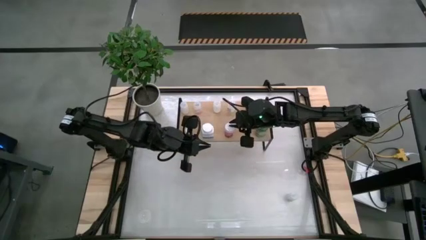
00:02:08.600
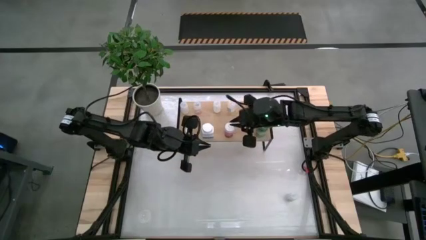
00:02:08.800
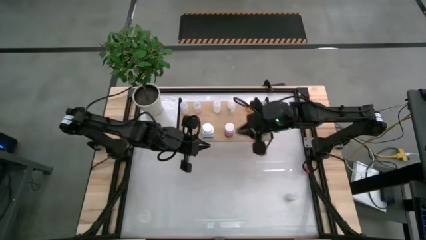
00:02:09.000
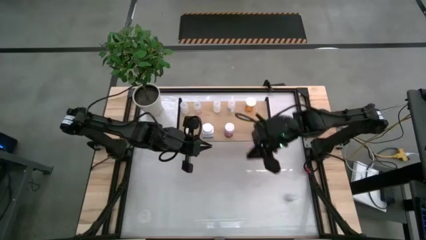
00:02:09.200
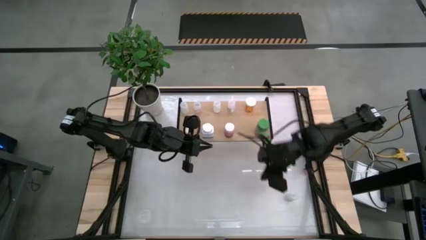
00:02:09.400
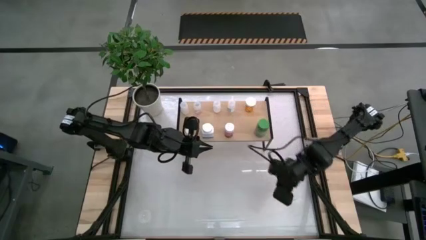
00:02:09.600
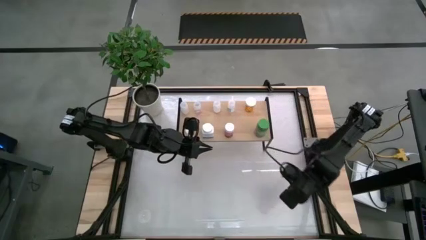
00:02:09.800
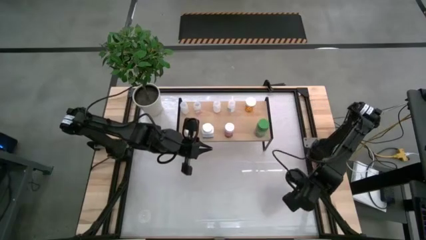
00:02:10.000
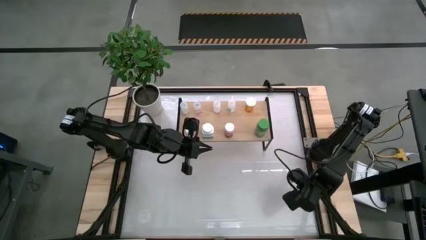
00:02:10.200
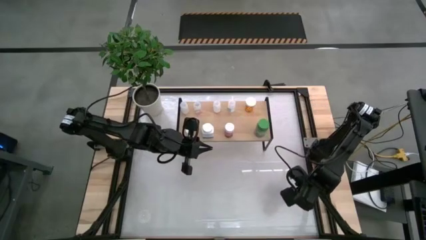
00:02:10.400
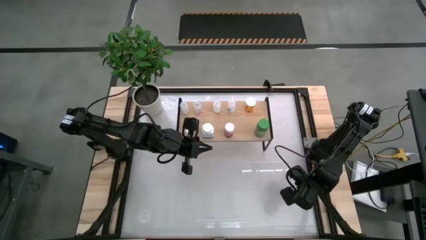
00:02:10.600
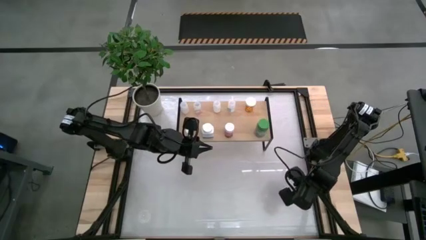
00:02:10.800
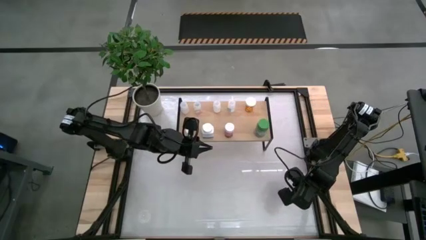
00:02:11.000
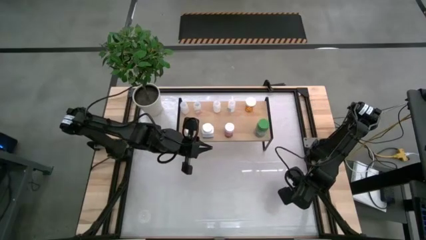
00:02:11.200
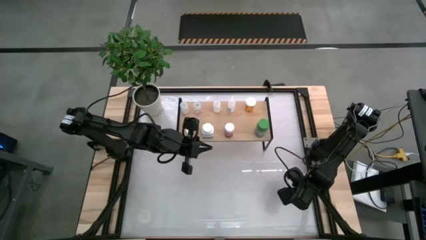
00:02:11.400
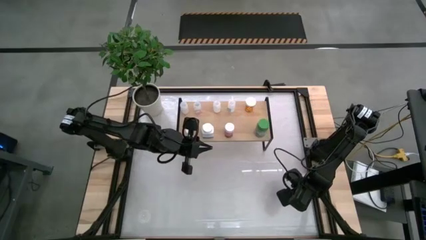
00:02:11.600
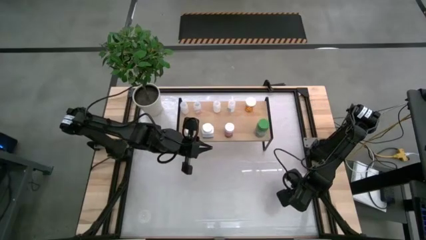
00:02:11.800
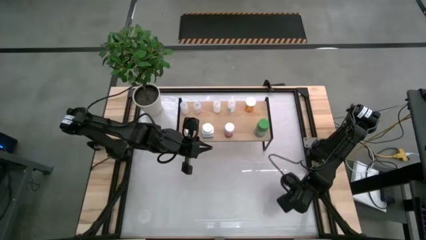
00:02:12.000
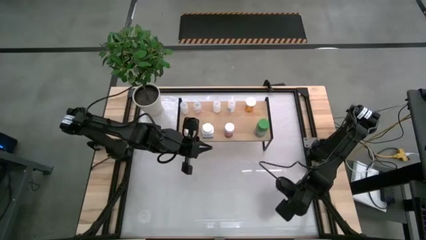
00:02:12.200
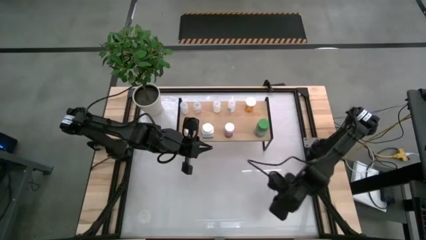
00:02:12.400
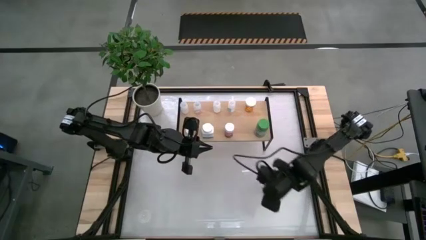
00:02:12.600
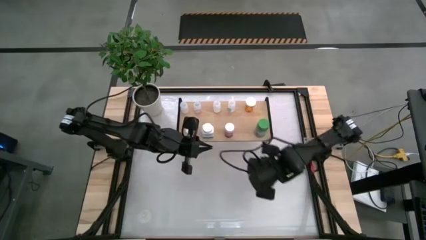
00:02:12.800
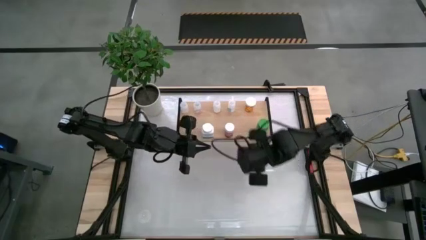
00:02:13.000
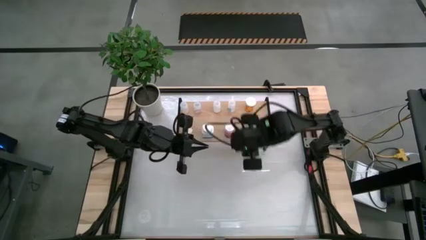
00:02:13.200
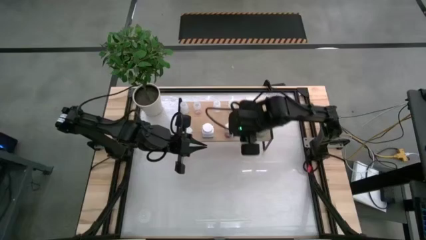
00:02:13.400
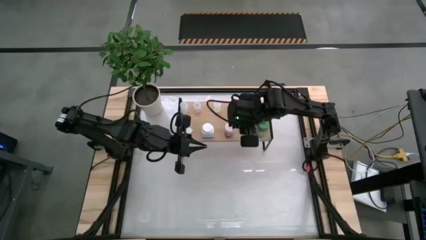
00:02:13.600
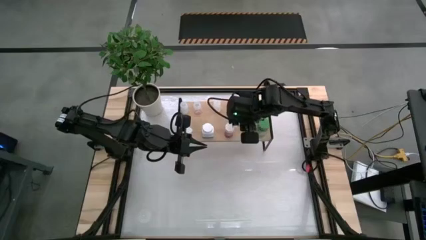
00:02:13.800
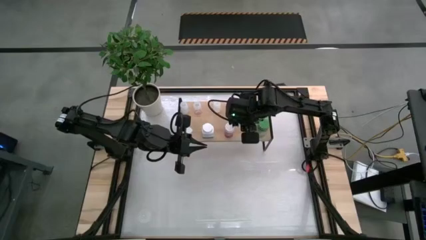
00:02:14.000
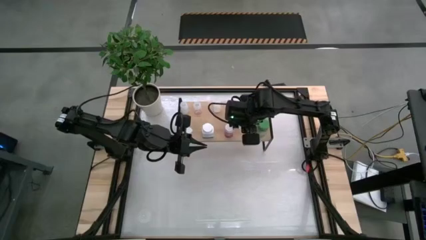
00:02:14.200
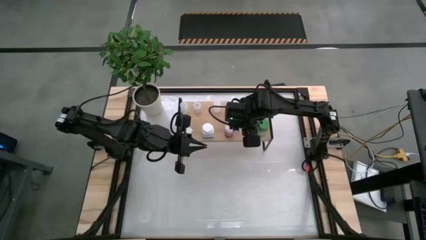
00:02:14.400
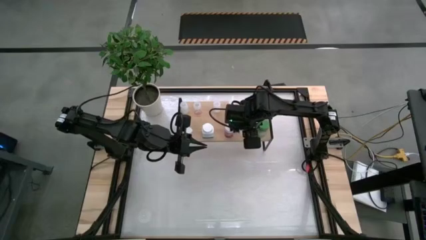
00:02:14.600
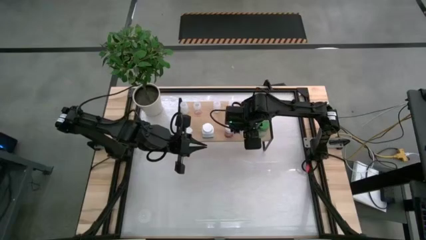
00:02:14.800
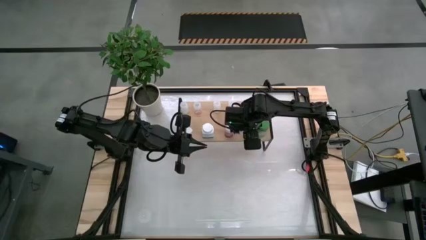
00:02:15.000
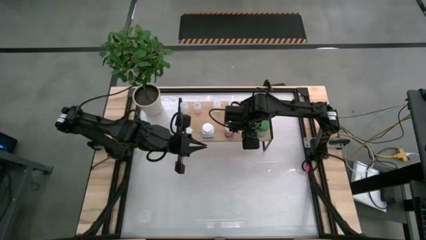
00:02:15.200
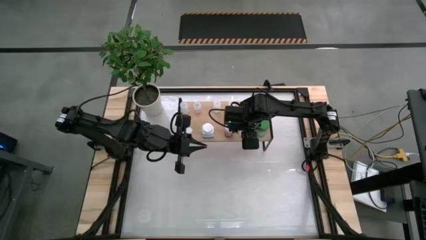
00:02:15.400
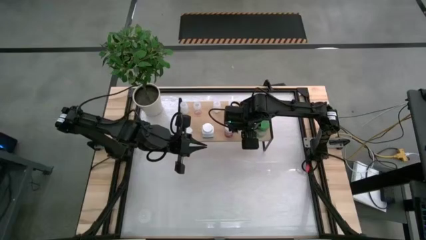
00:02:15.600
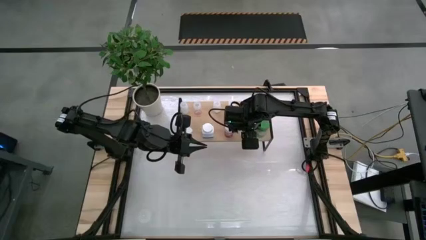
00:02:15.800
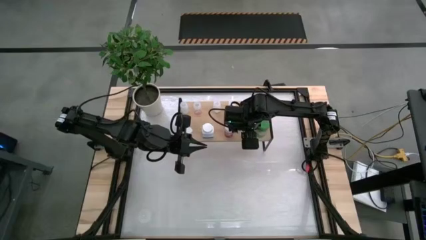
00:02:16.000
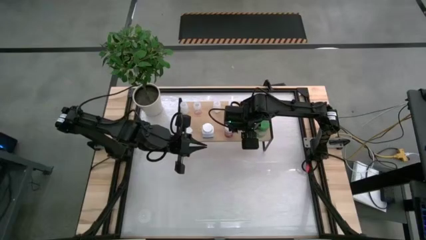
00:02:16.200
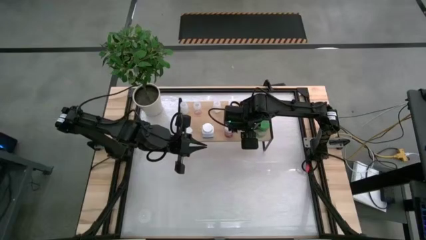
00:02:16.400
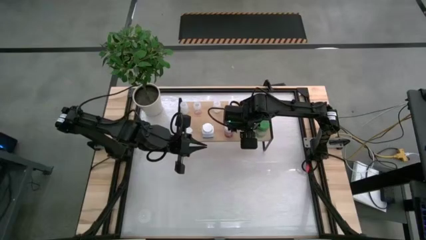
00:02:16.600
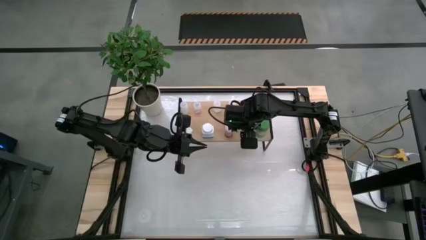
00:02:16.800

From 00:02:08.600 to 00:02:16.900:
Task: Pick and place medicine bottles onto shelf by color
Put the transparent pill bottle on the shelf

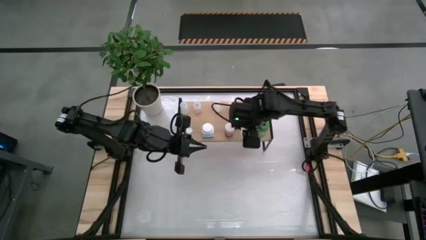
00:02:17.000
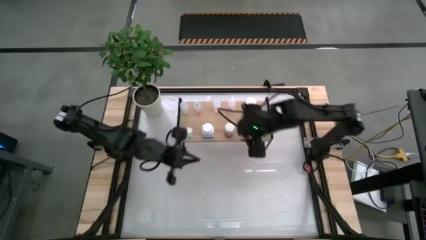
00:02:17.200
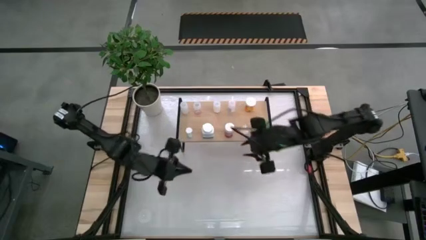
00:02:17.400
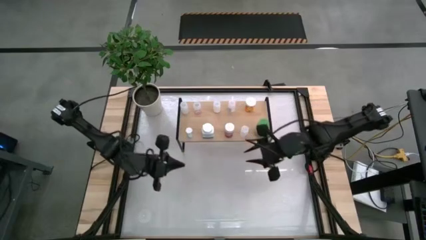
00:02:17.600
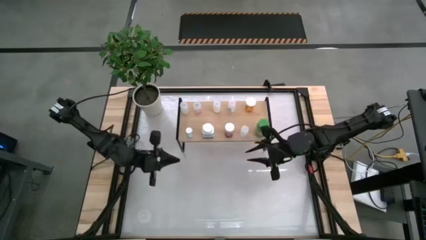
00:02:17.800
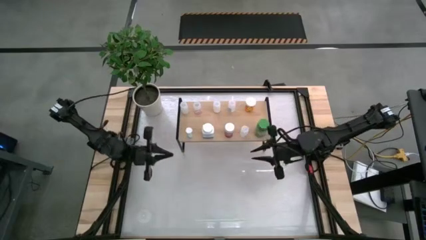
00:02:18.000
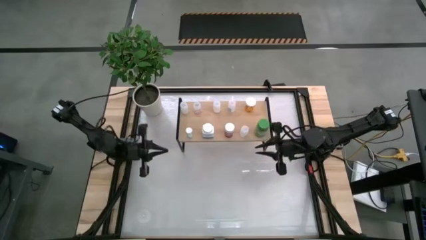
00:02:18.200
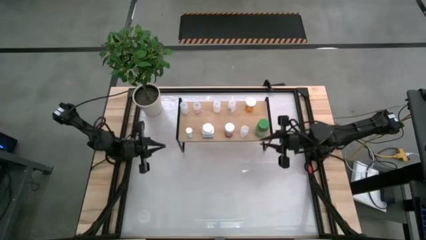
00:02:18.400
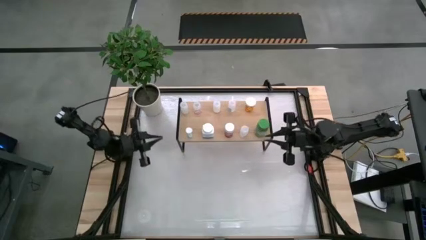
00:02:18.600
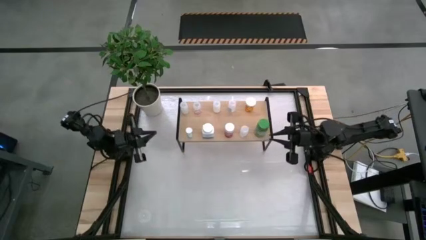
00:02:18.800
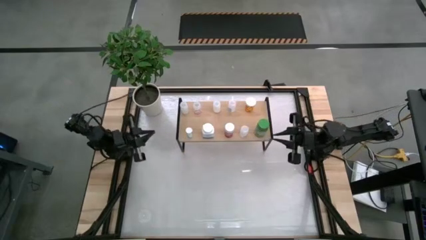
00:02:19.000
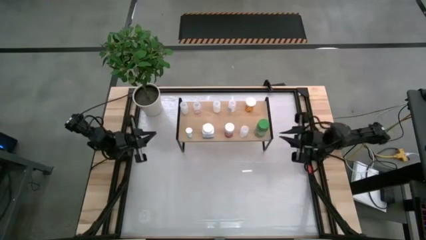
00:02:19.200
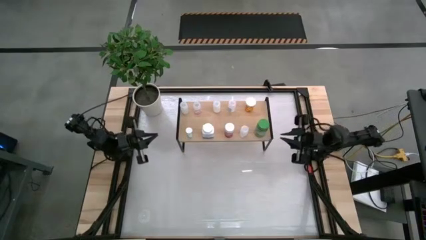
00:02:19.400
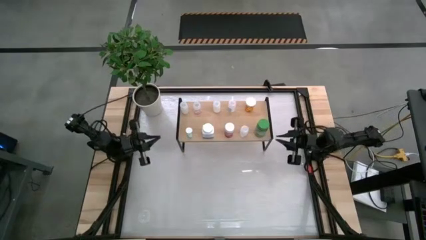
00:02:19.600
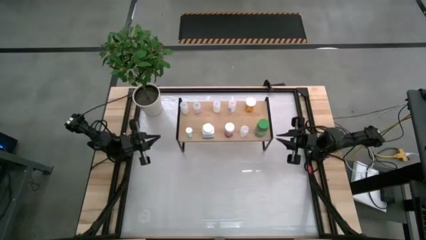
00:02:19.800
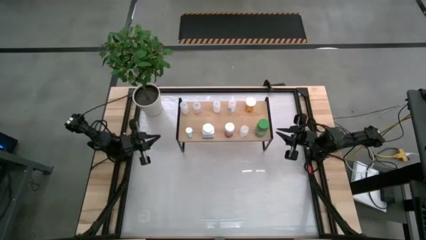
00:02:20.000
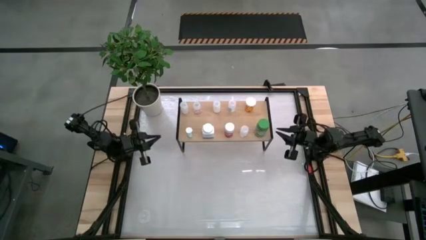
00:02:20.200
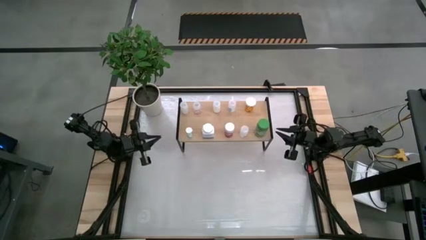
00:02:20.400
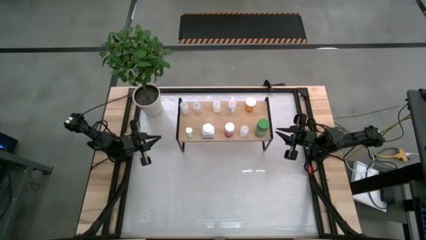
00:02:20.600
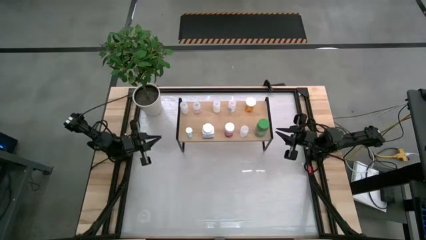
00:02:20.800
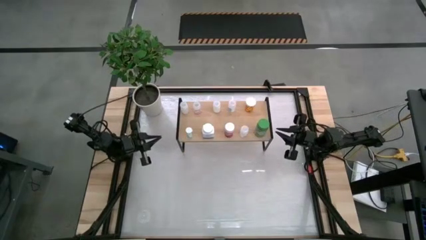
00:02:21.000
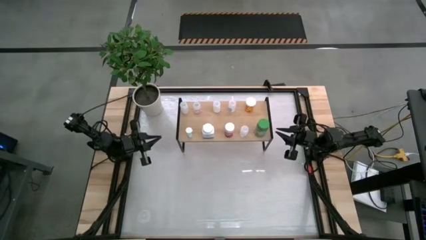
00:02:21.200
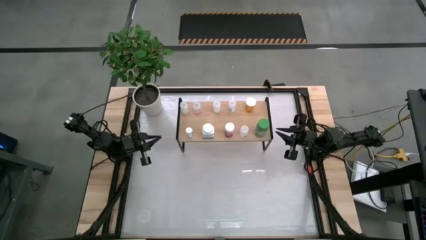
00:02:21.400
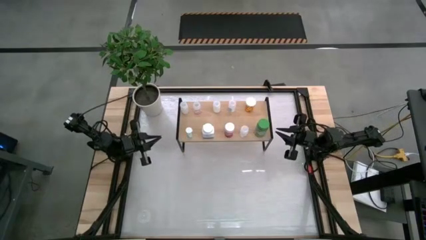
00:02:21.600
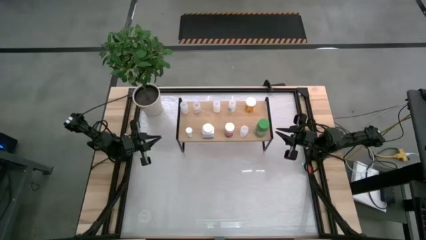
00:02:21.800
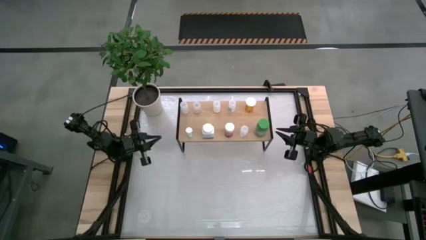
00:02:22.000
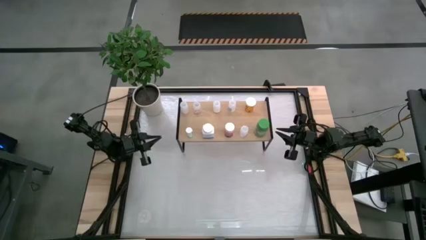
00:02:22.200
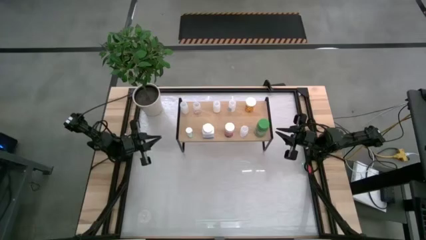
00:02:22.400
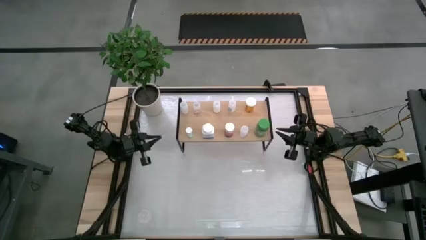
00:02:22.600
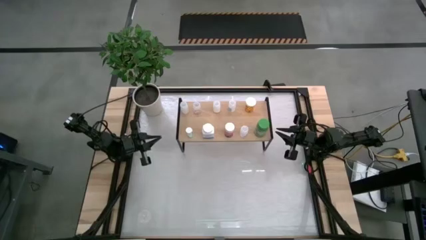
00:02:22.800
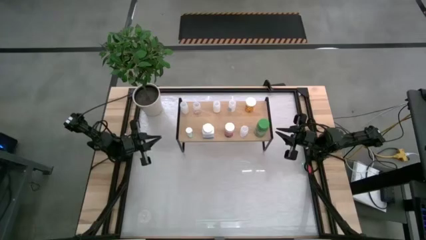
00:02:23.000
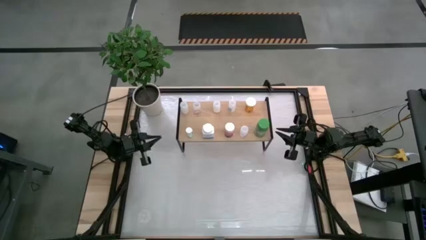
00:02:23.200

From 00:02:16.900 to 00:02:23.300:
Return to Home Position

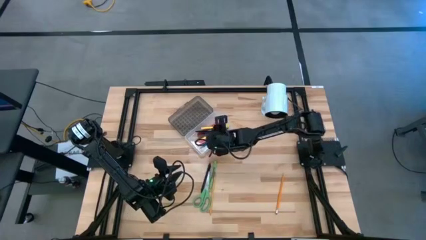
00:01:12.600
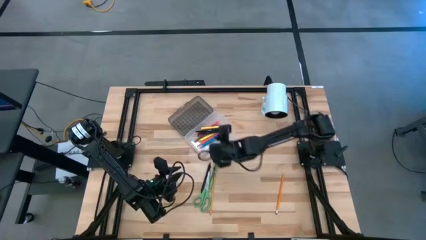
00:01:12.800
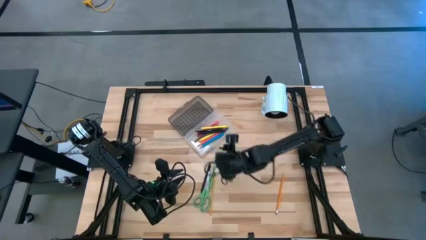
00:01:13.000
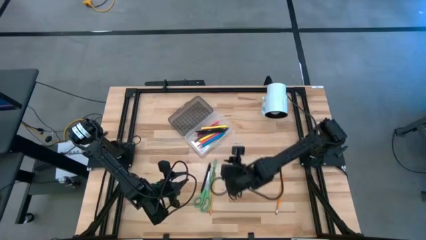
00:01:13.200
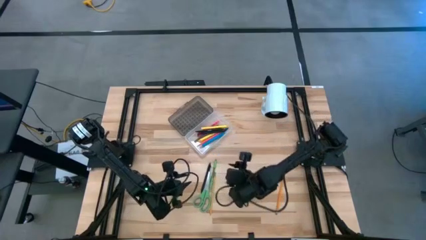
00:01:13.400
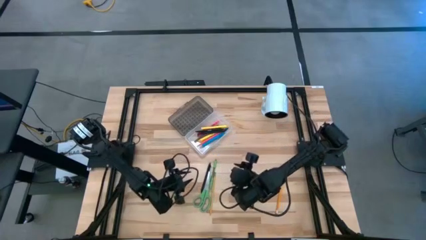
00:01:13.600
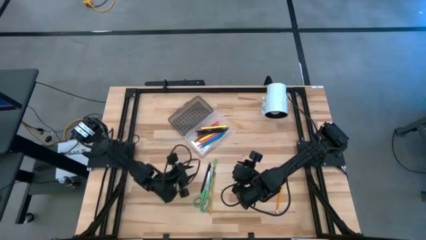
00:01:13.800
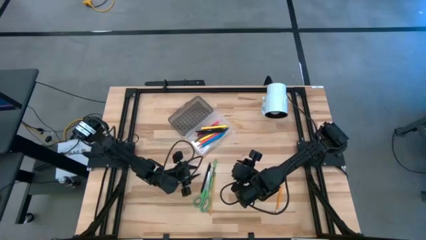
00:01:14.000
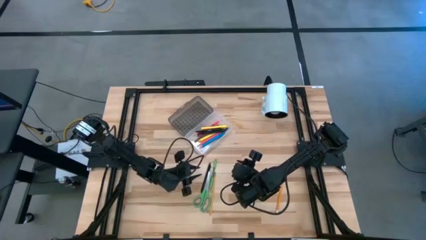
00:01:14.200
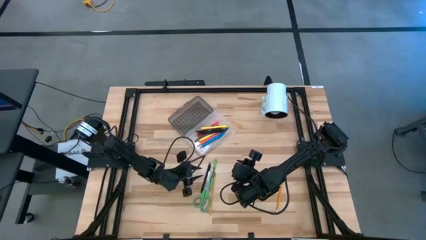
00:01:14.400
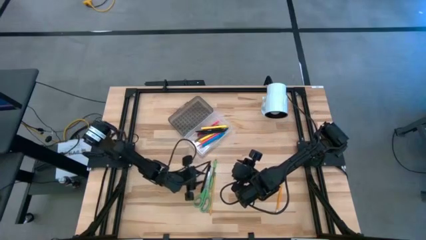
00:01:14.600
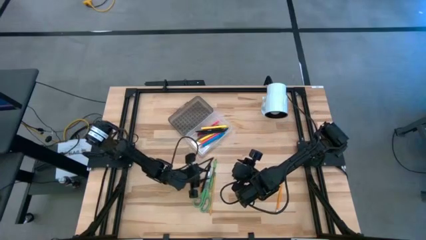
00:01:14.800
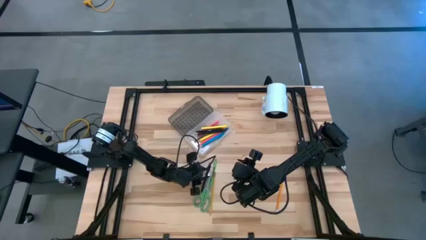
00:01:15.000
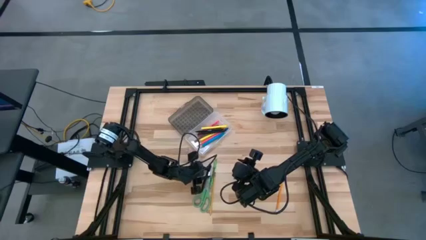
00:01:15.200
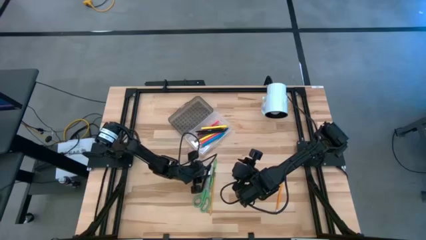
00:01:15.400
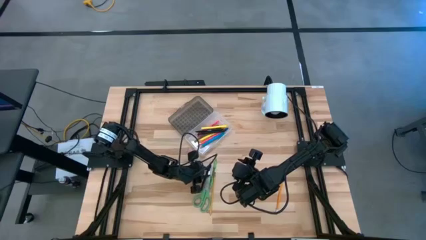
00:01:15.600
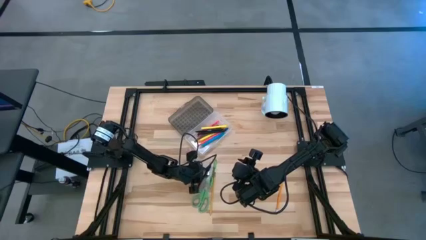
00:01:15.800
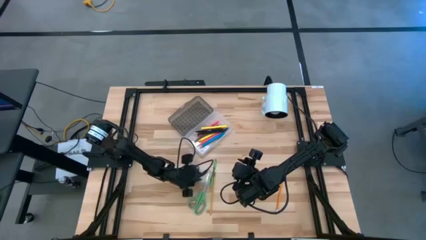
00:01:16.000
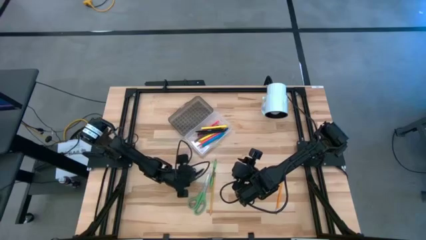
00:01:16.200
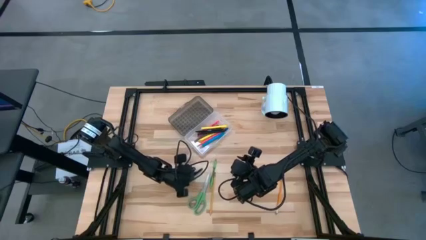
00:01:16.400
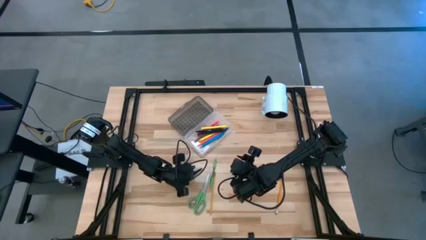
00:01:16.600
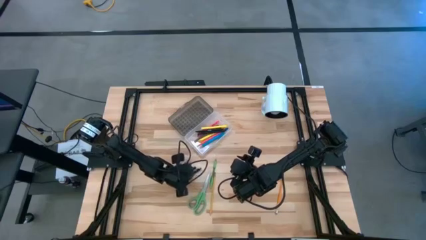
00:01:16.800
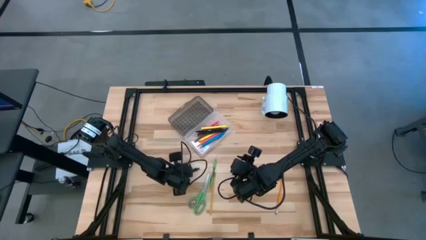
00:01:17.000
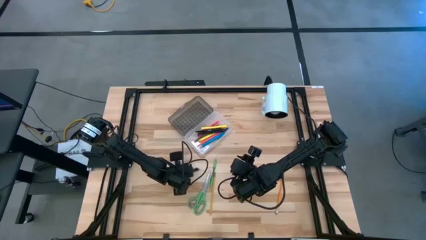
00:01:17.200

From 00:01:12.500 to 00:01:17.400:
Task: Pick & place school supplies into a supply box
Put the black pen into the transparent supply box
